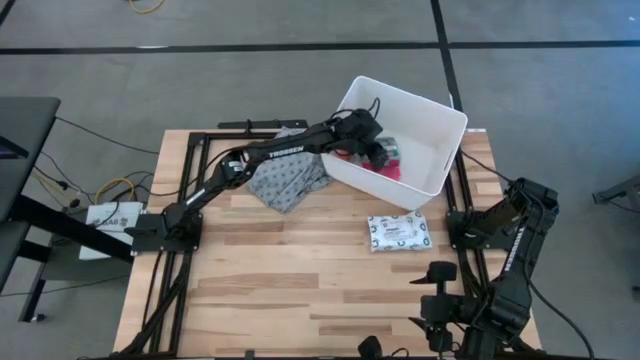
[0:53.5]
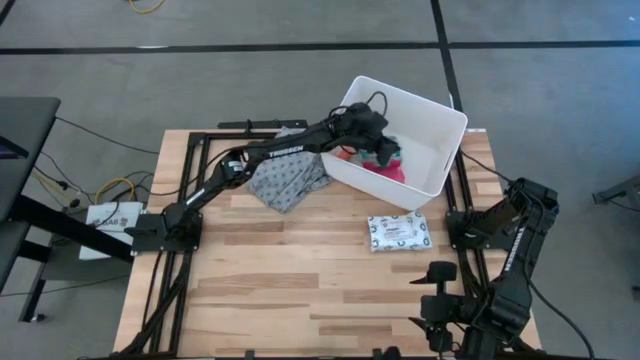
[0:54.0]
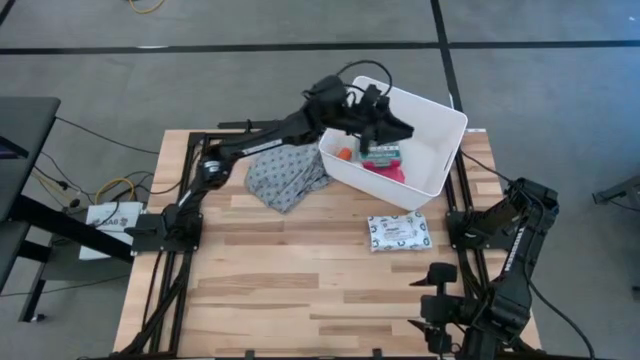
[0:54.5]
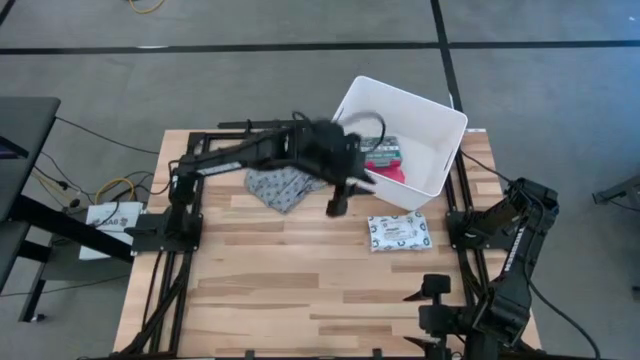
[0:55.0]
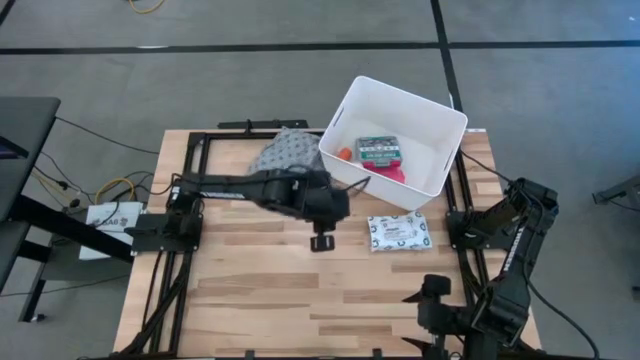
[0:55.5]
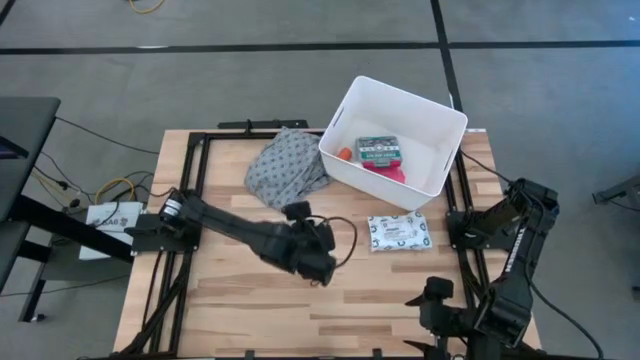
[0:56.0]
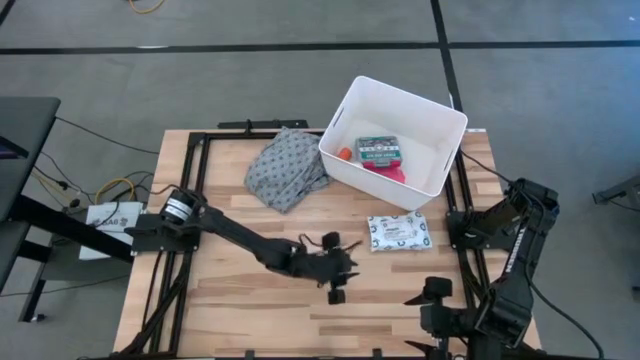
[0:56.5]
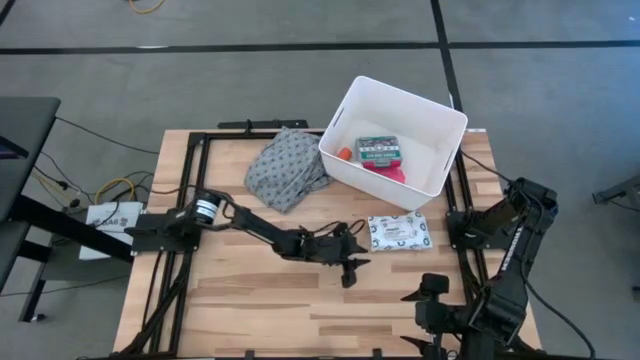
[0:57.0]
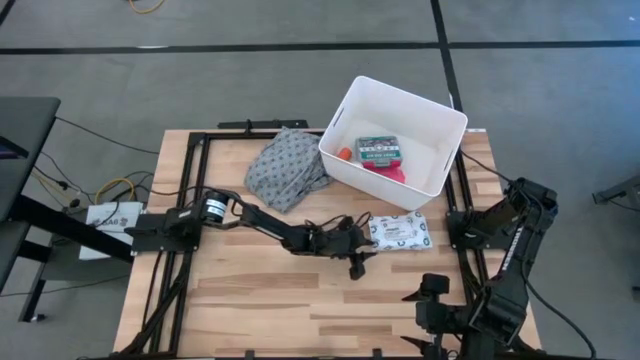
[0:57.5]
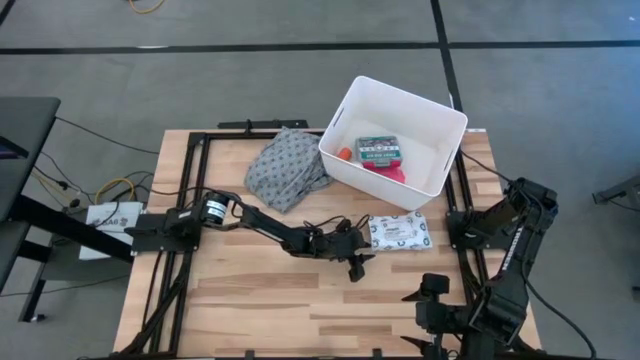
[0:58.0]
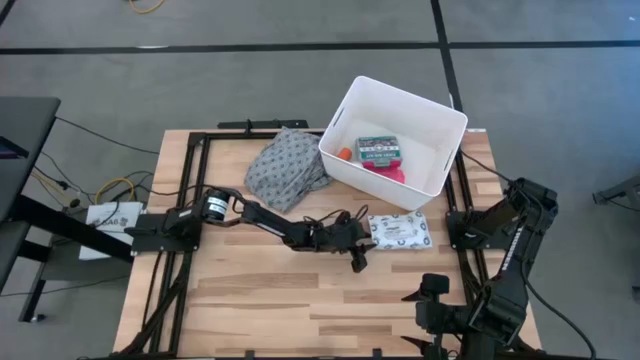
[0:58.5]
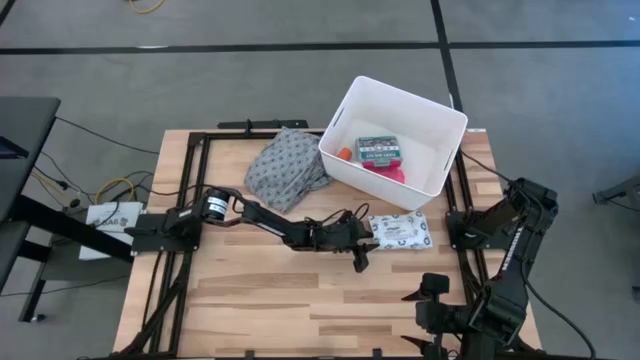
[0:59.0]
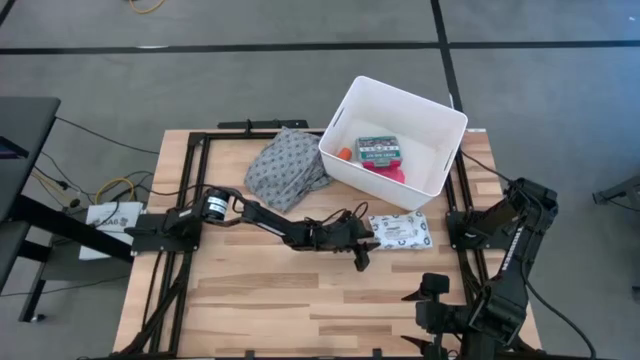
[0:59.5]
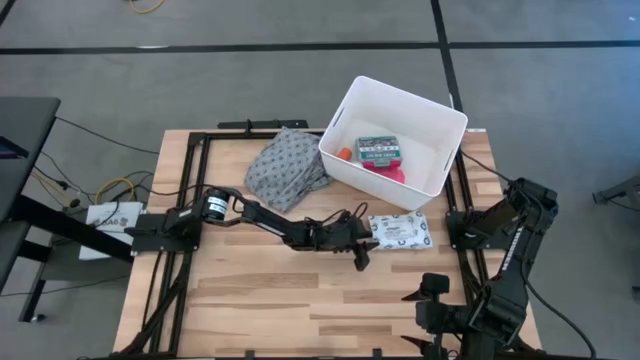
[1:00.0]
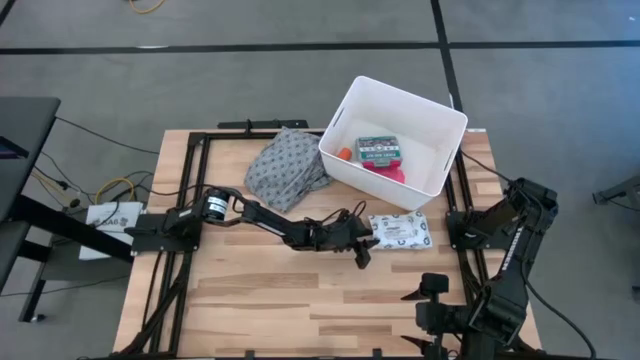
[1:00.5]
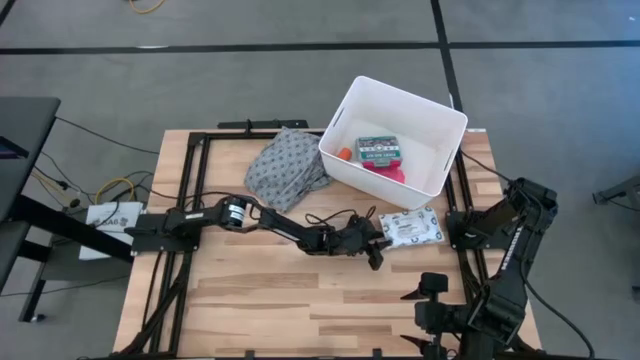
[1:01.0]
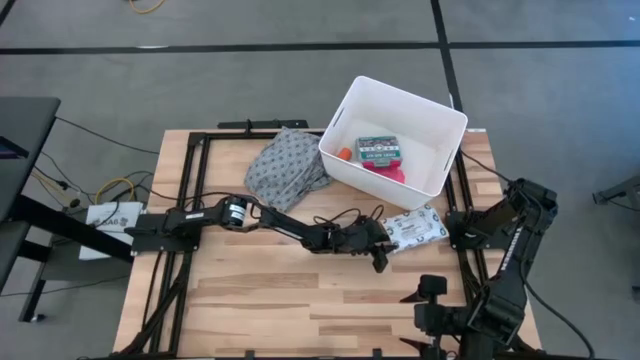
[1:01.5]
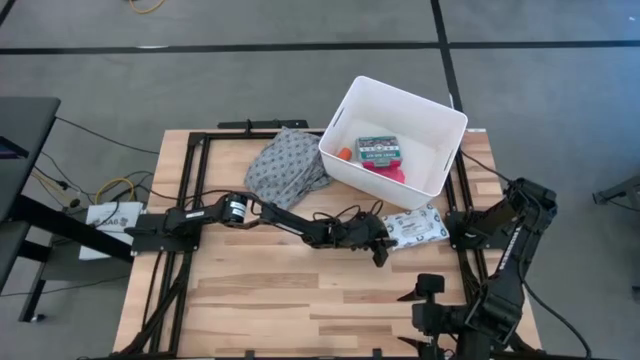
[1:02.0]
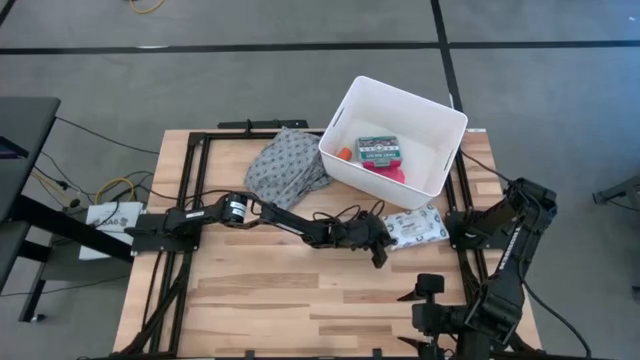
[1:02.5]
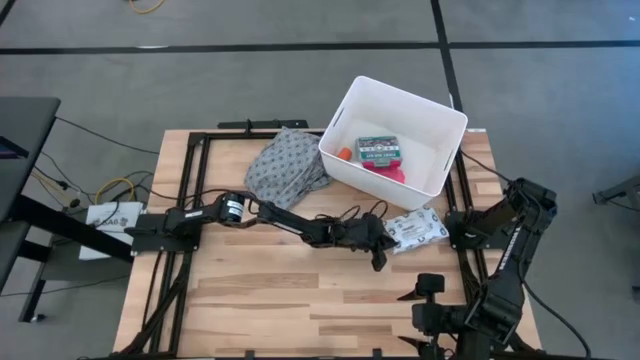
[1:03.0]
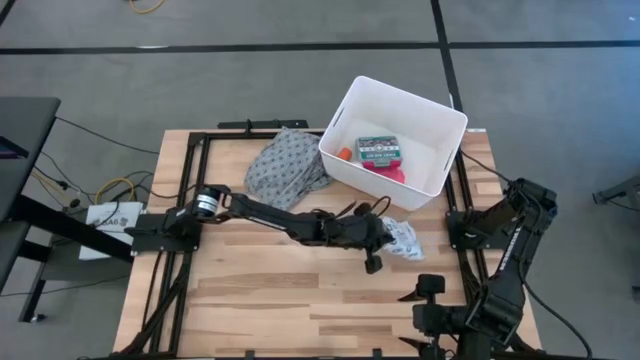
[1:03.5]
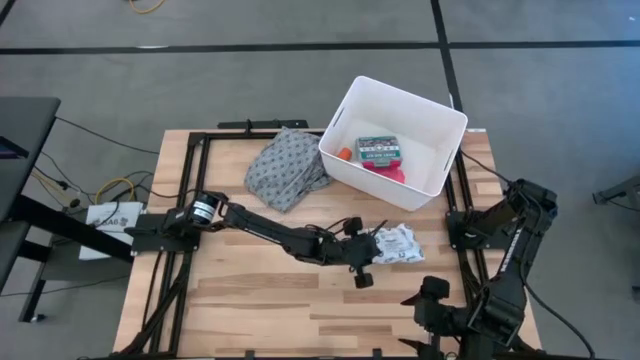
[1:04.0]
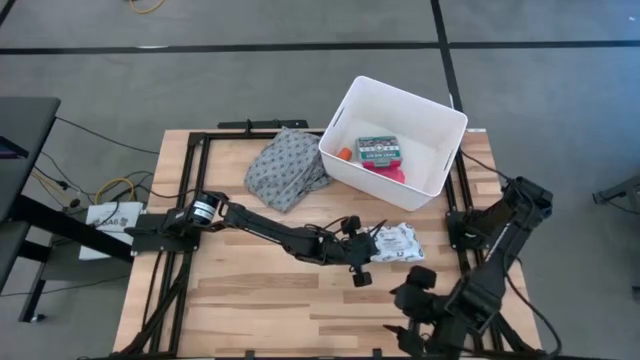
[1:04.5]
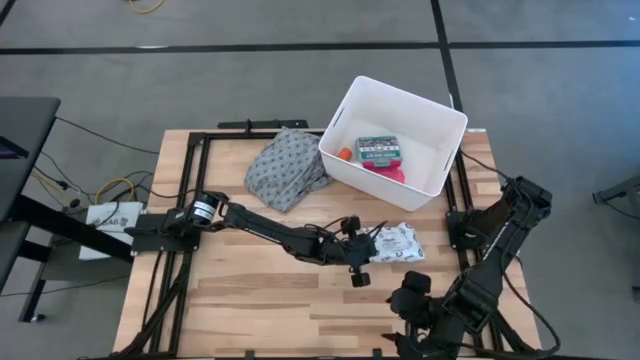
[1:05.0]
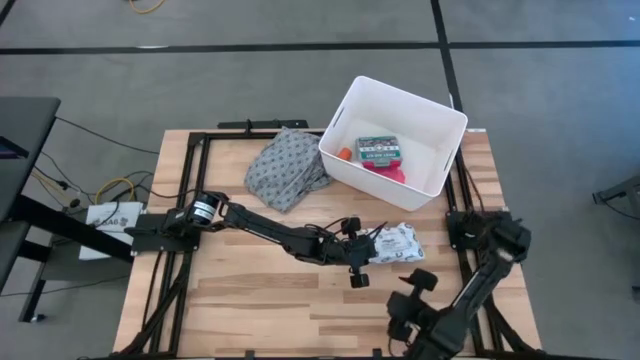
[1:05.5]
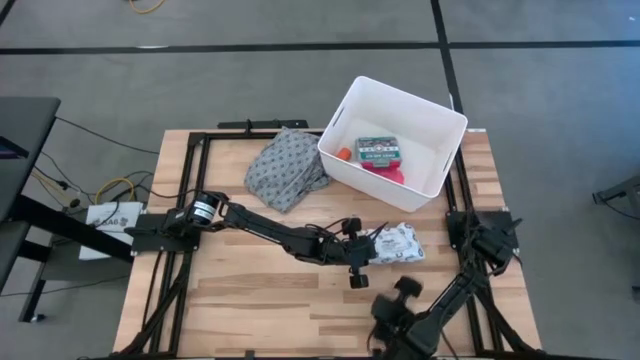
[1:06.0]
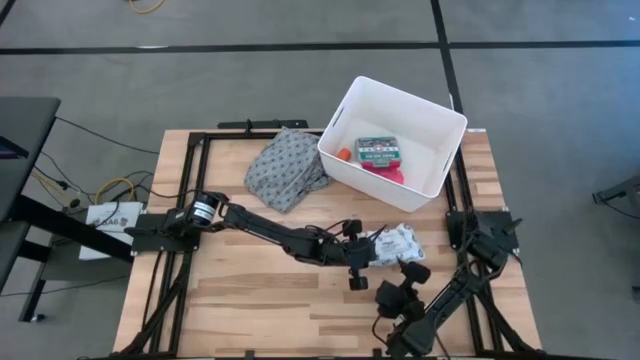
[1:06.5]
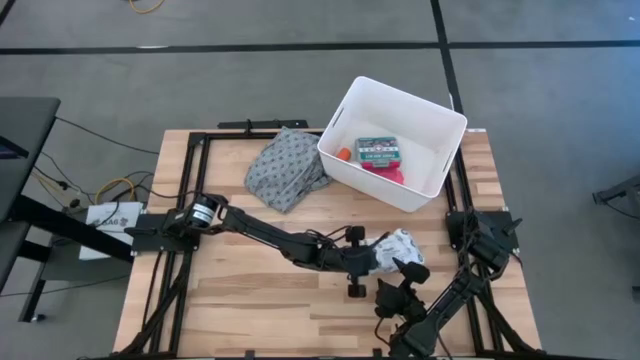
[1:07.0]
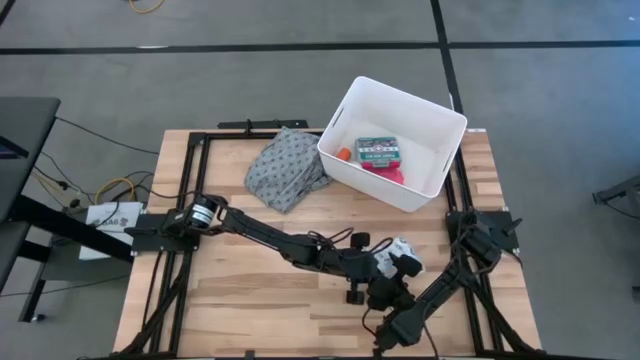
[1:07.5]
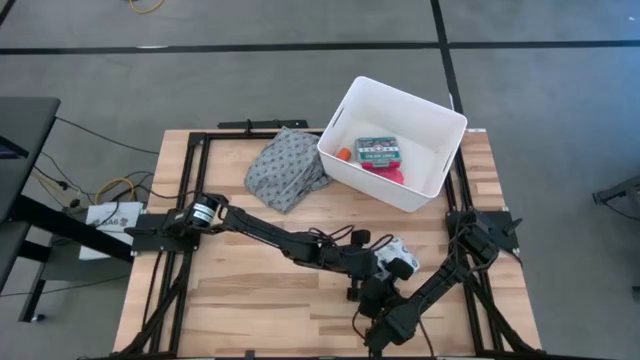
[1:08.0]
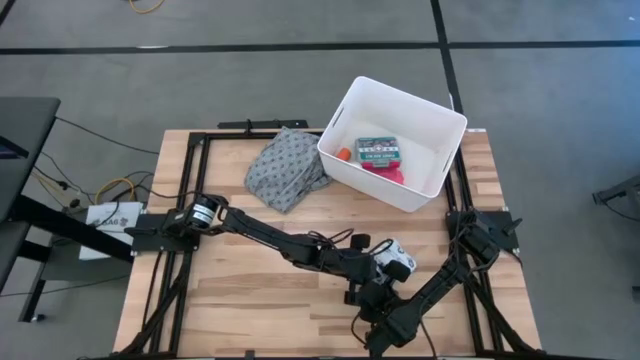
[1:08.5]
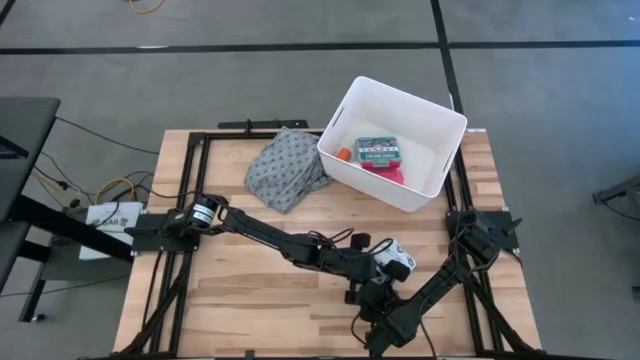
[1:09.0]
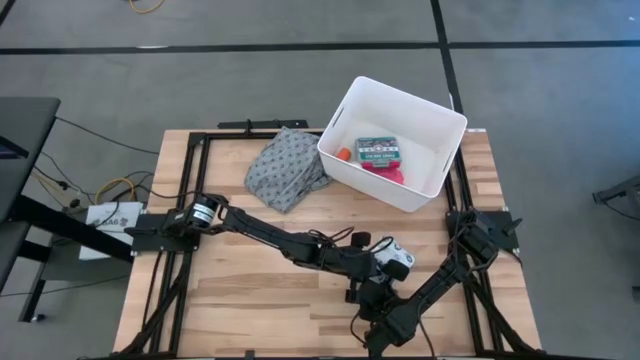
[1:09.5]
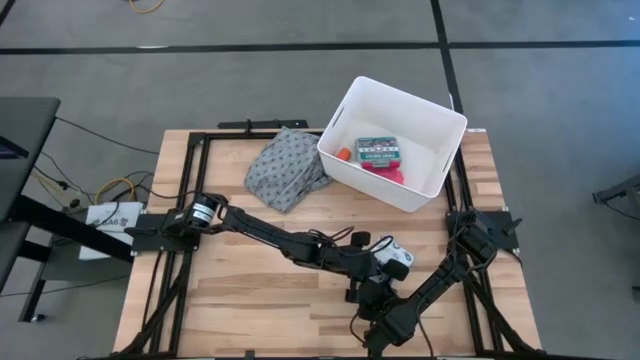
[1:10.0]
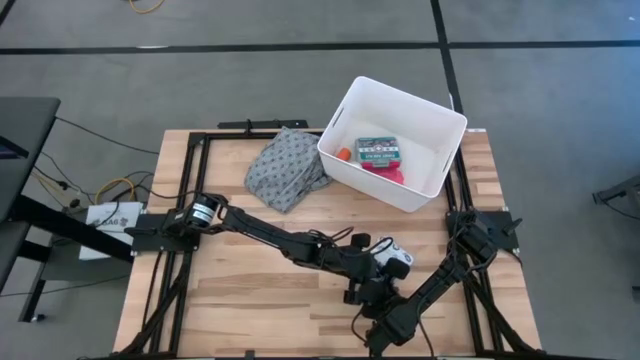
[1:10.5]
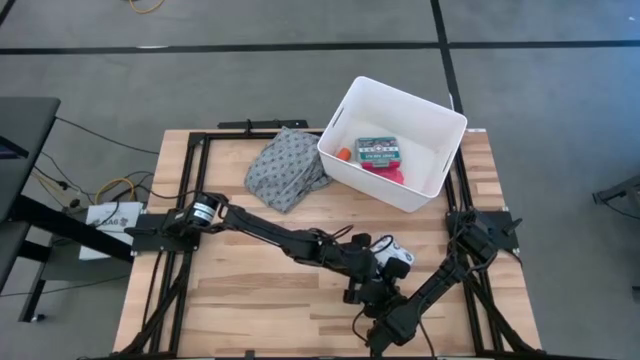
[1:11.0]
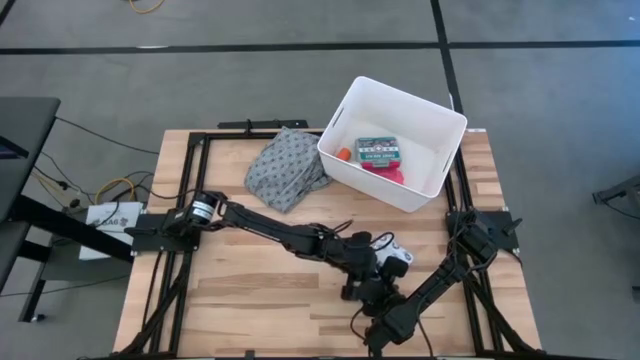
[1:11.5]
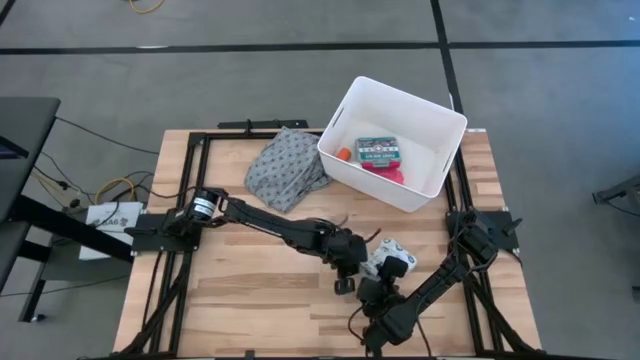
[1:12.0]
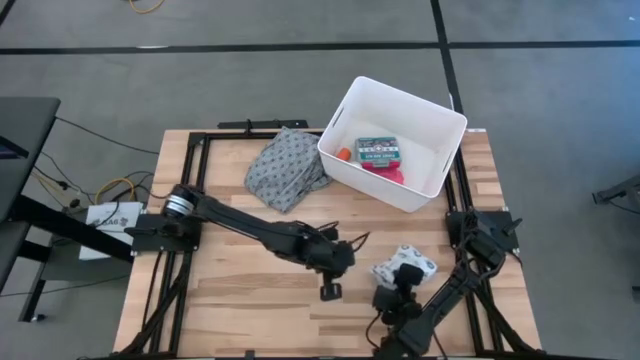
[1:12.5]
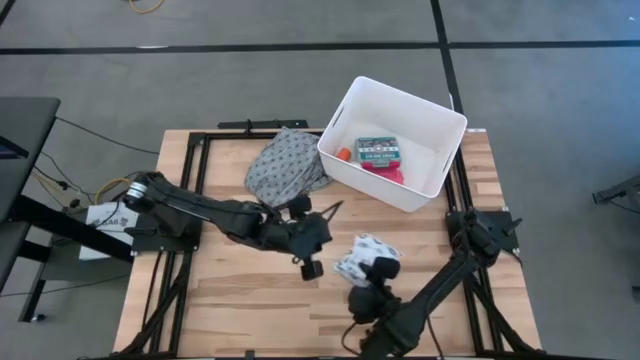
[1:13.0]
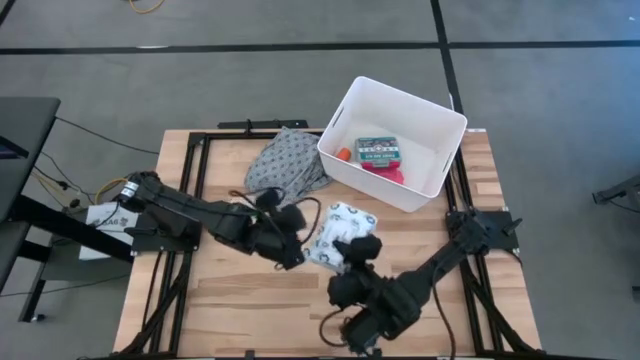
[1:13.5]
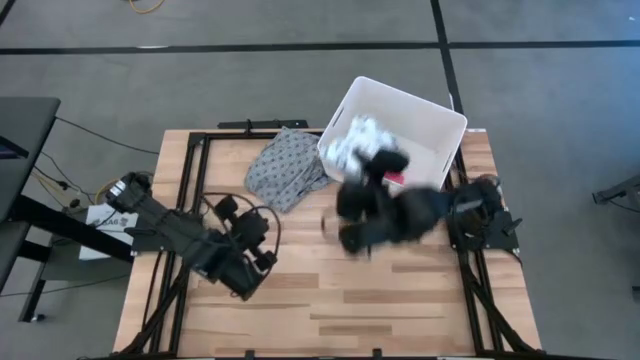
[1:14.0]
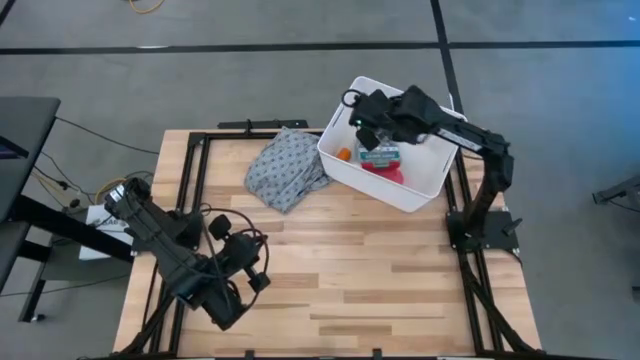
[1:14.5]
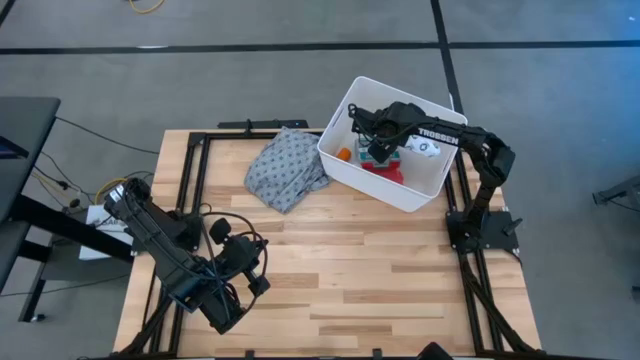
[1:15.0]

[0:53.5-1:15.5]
Task: Pick & place medical supplies in basket/bin
Put the white bag in the white bin

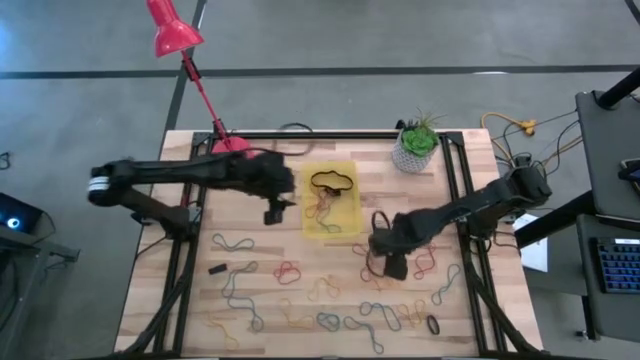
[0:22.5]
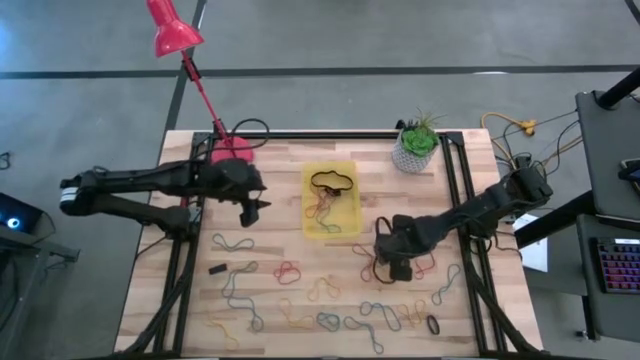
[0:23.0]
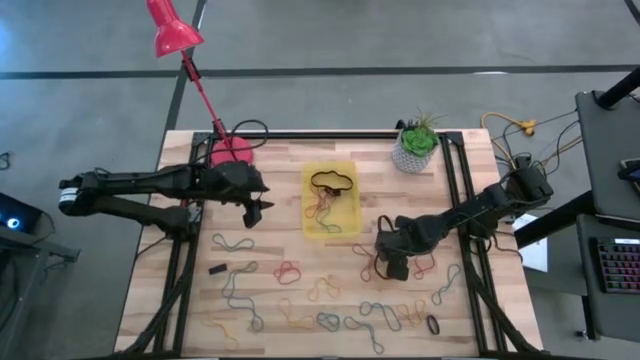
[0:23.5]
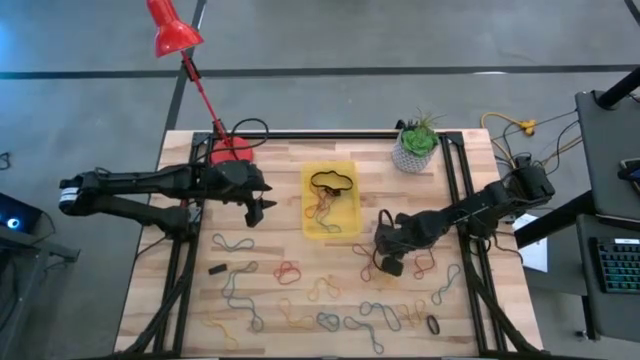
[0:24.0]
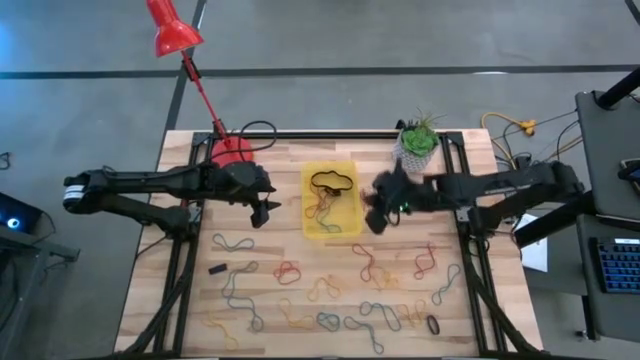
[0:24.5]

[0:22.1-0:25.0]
Task: Pick and place rubber bands into bin
Put the red rubber band into the yellow bin
